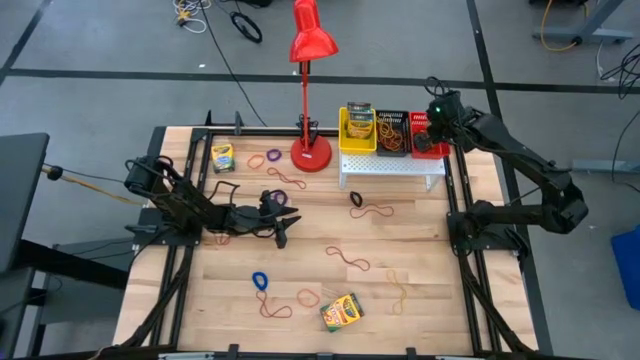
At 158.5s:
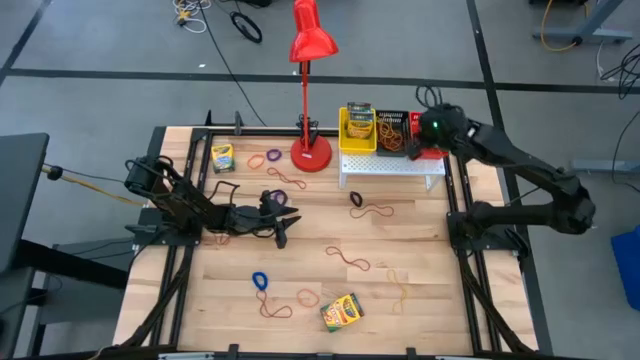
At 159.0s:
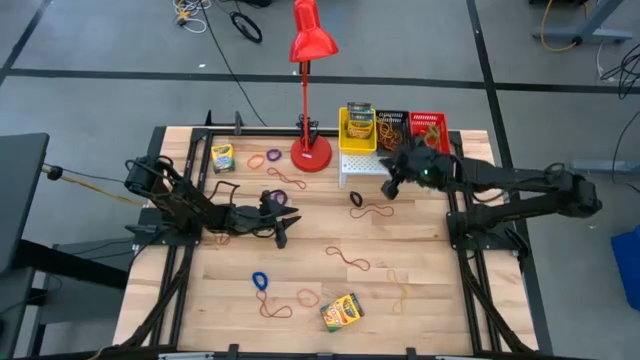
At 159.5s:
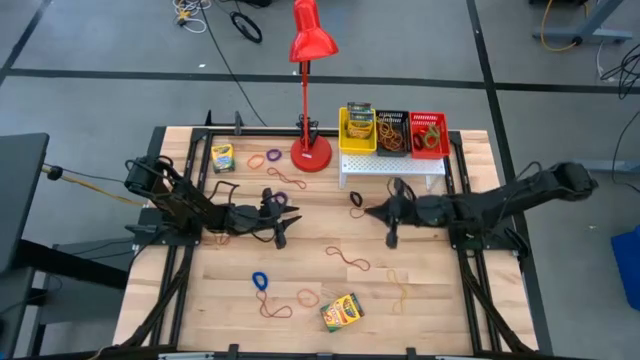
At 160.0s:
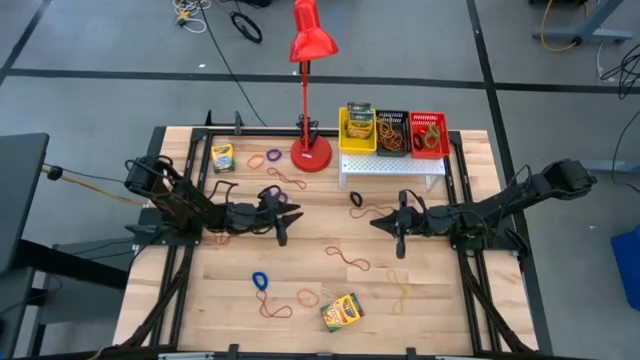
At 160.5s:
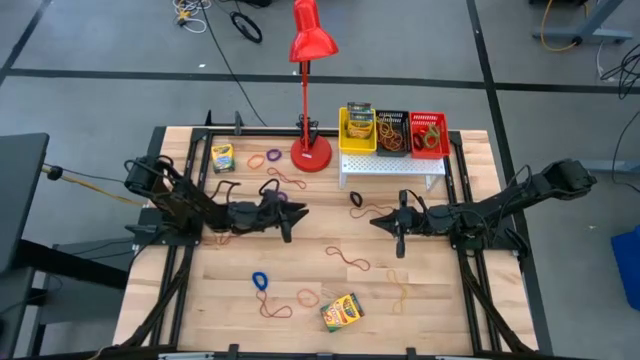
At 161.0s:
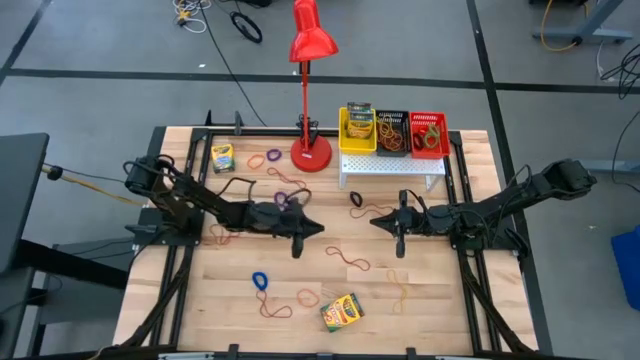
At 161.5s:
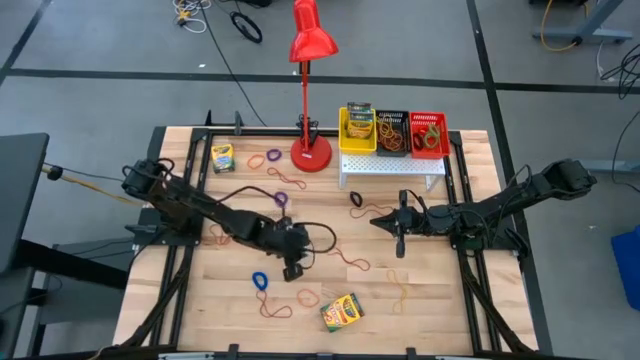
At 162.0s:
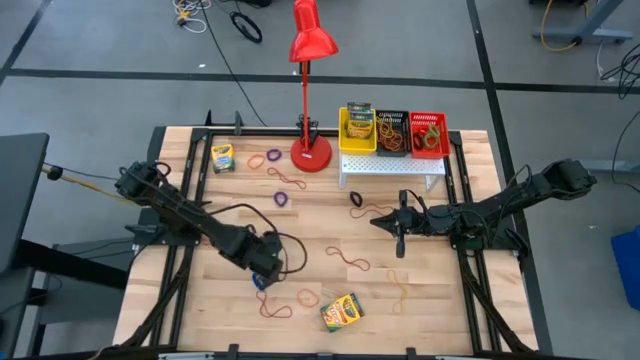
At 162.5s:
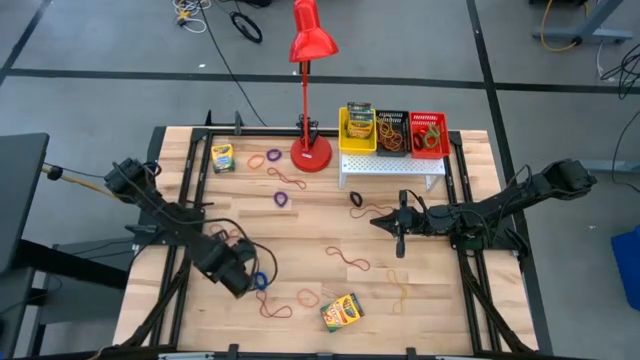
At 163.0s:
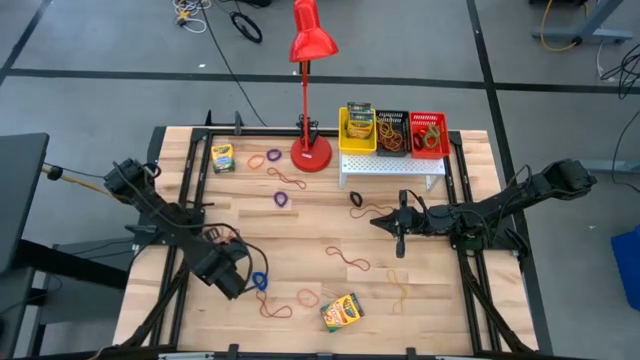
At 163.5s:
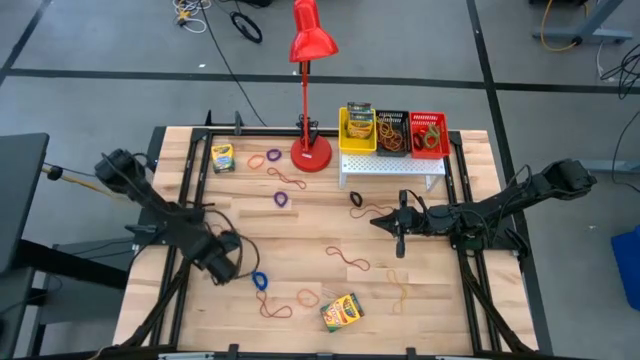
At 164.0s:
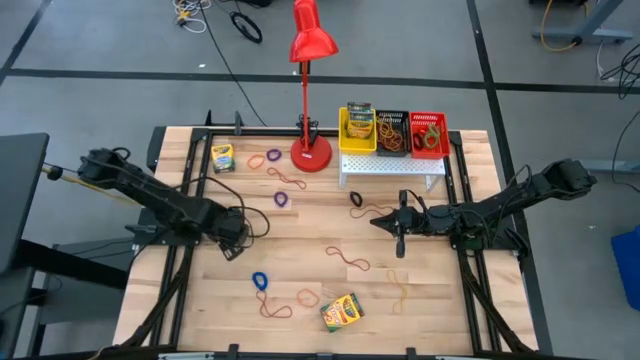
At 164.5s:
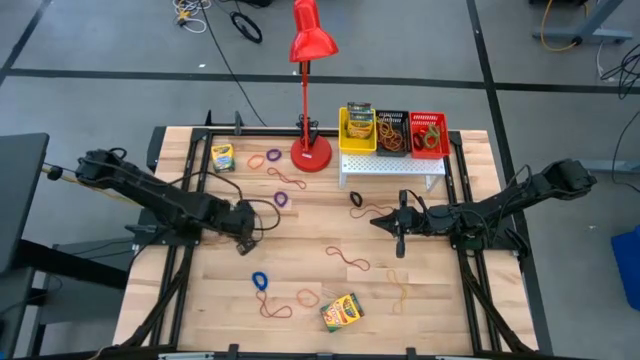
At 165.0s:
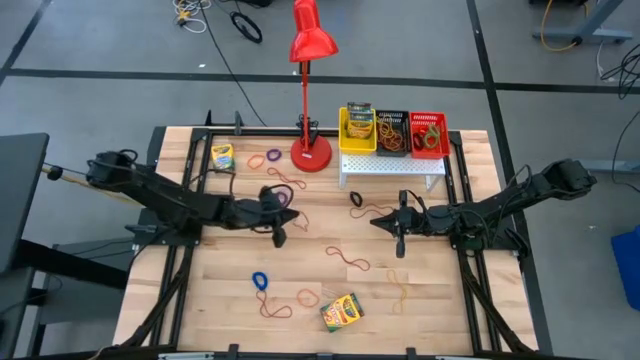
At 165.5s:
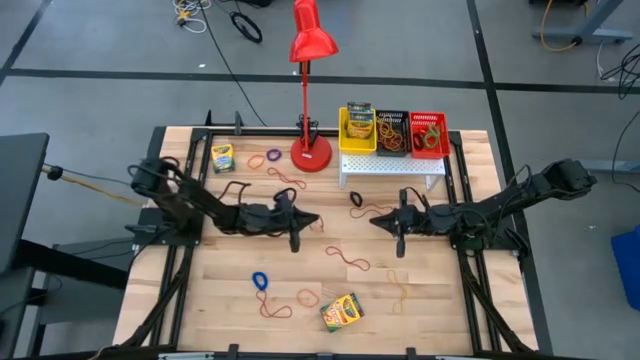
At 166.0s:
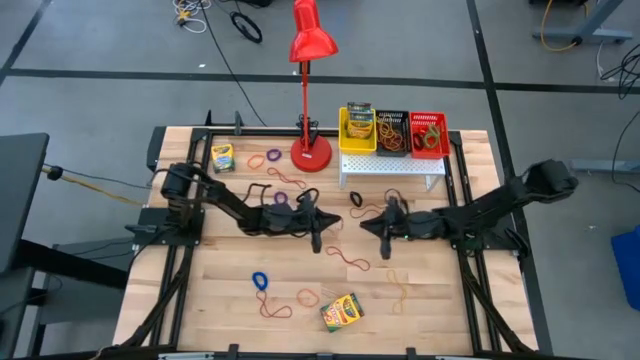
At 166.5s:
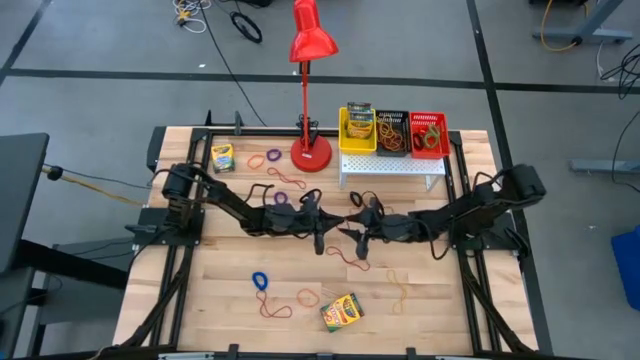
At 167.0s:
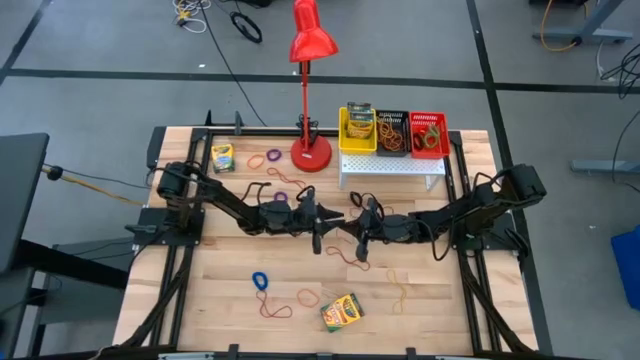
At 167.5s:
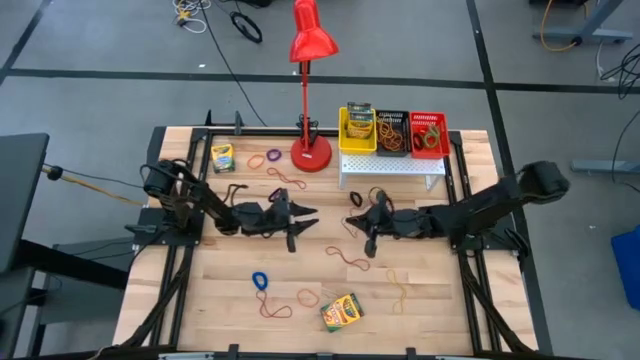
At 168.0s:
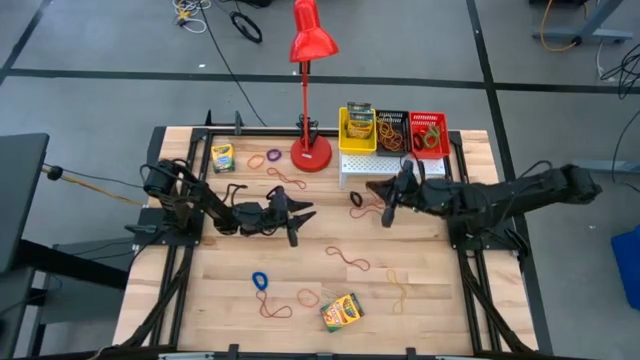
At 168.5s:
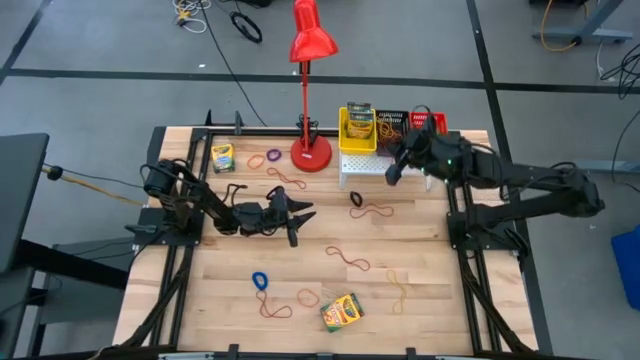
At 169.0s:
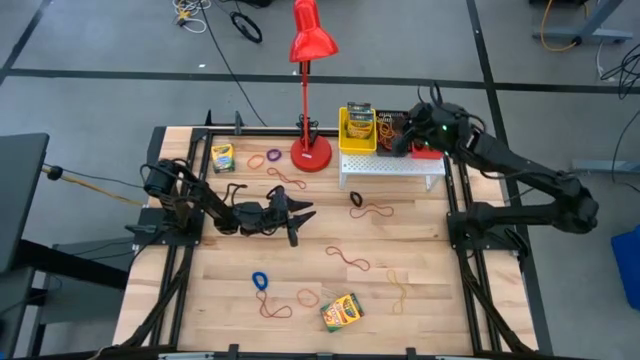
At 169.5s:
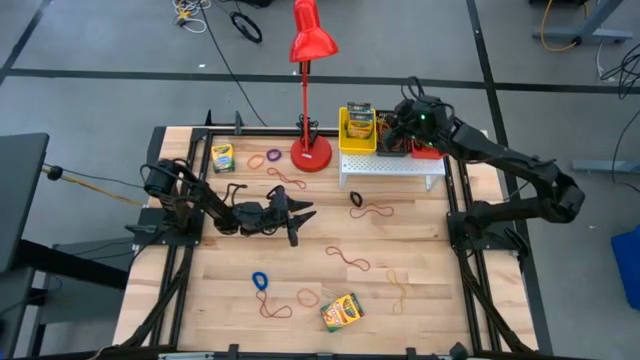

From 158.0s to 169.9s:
Task: Pick & Place Office Desk Supplies
Put the red rubber band into the black bin on the shelf

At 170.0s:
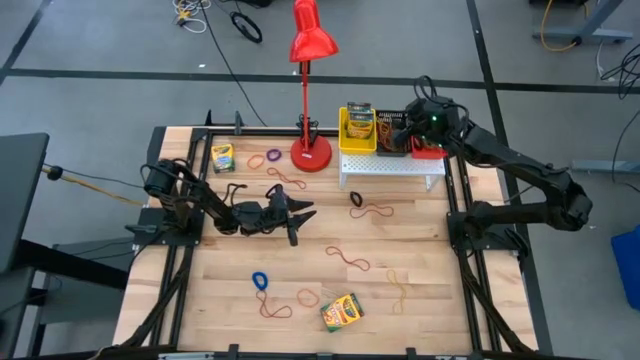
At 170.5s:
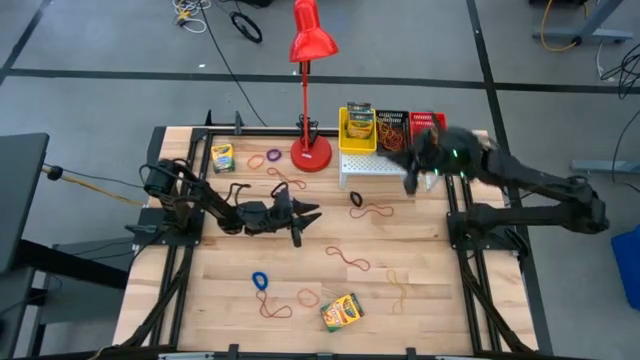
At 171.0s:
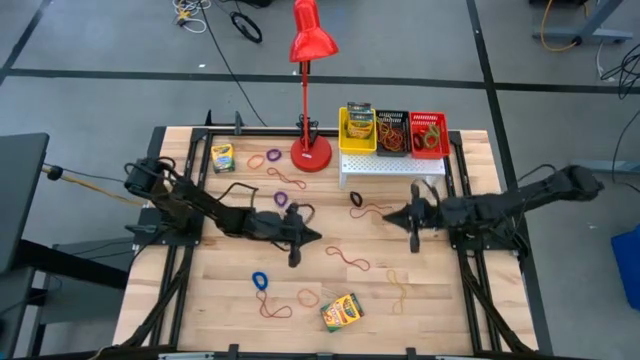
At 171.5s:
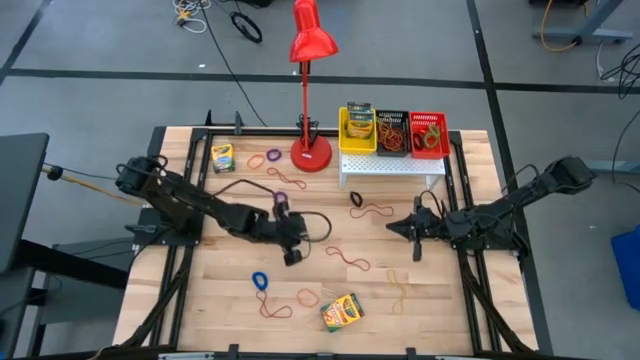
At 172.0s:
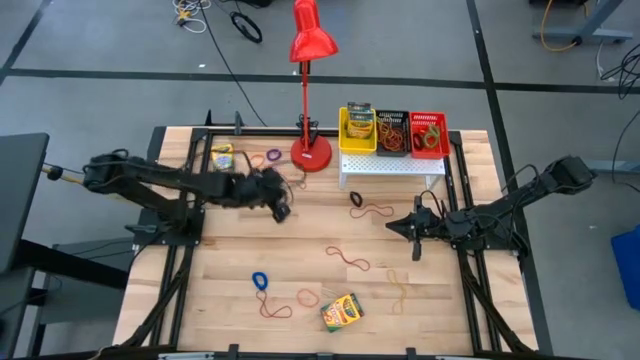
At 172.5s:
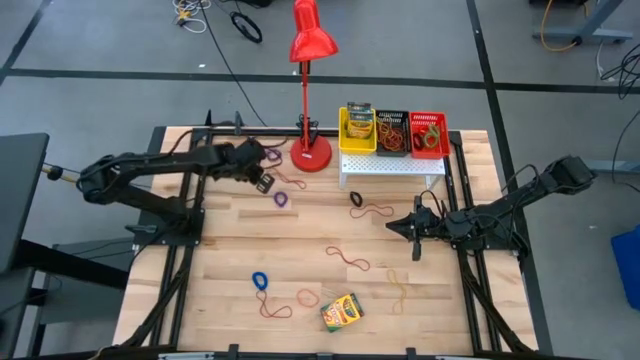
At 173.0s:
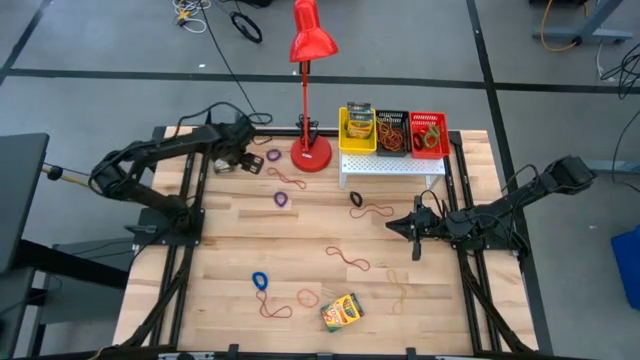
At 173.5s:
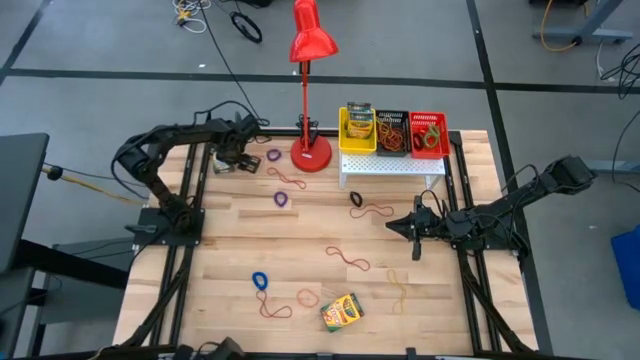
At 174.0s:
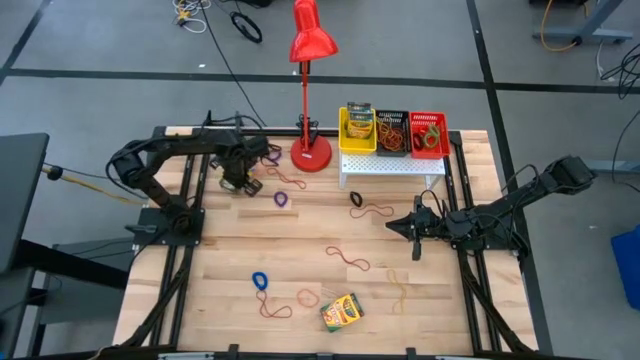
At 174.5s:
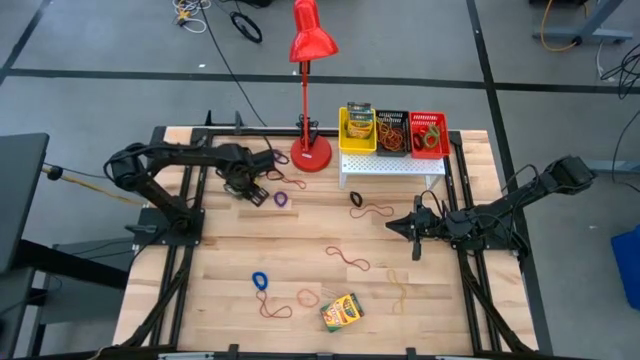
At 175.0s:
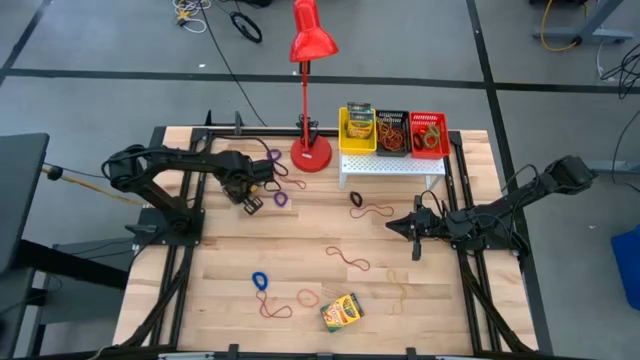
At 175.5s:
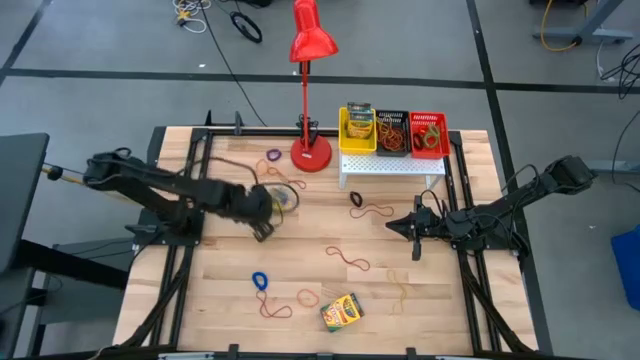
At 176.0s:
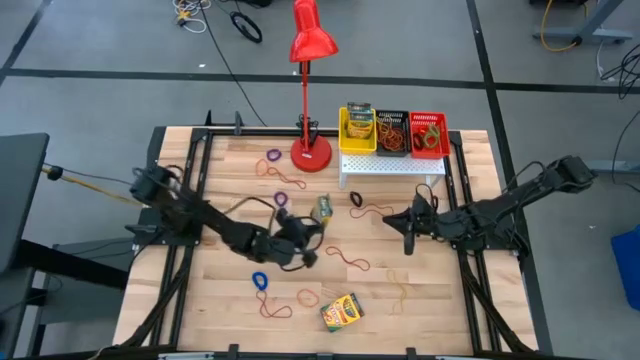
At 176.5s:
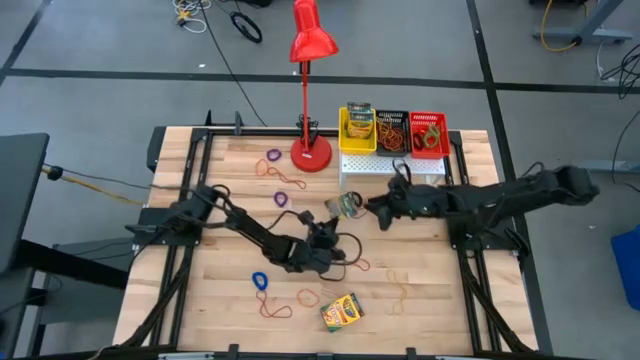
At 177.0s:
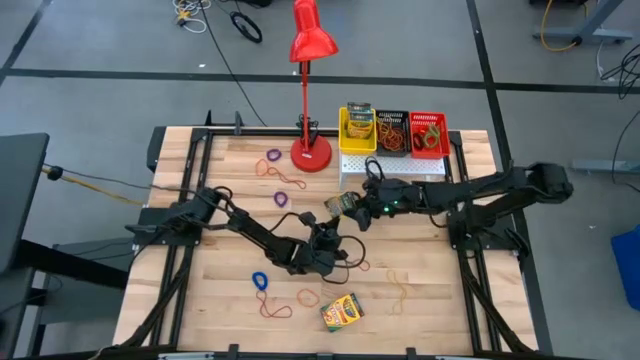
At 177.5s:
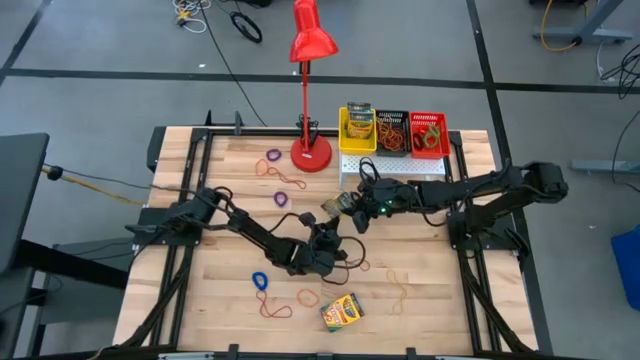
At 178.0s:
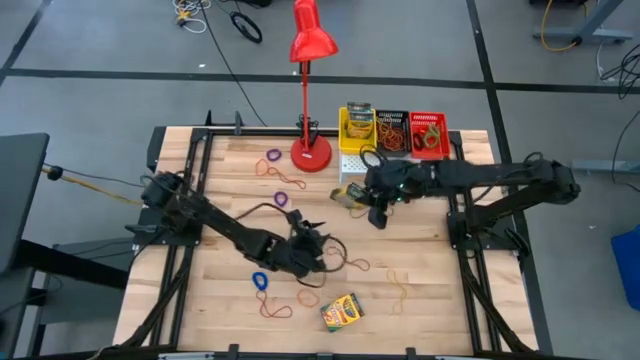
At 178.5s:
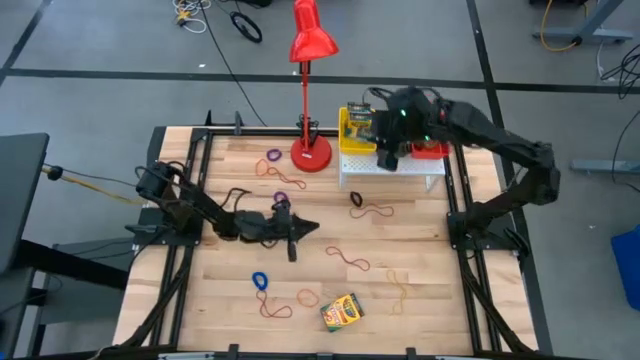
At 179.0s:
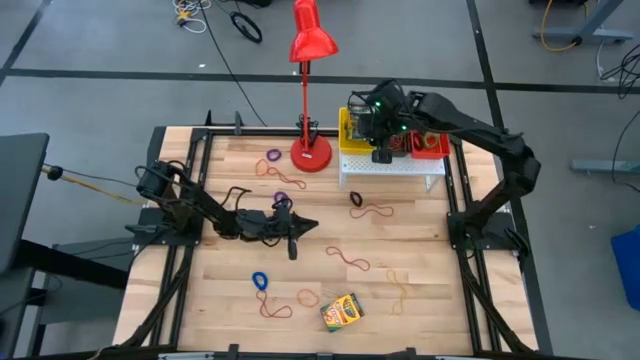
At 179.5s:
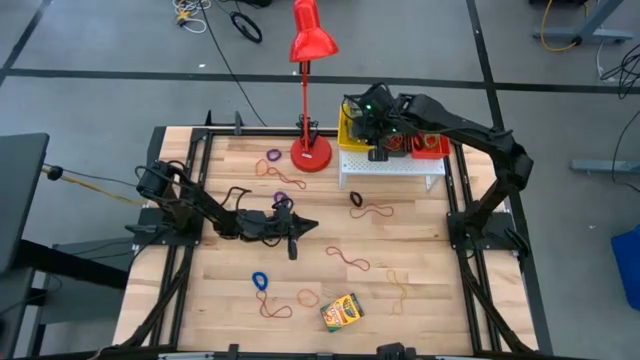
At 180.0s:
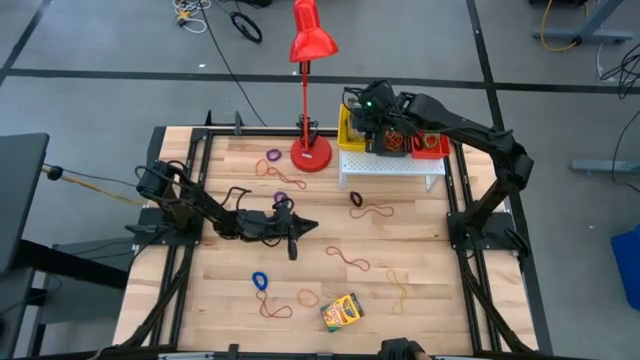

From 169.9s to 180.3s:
Put the crayon box into the yellow bin on the shelf
